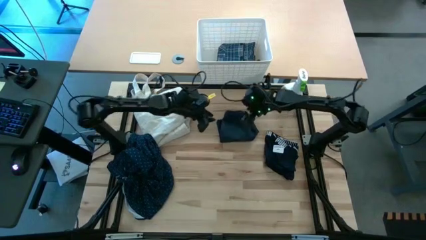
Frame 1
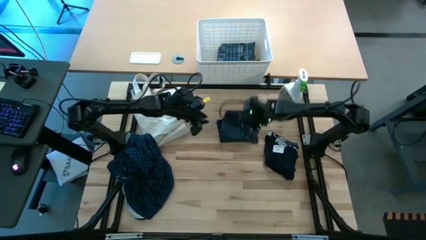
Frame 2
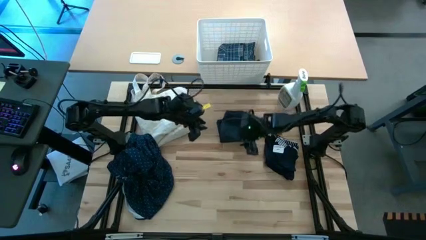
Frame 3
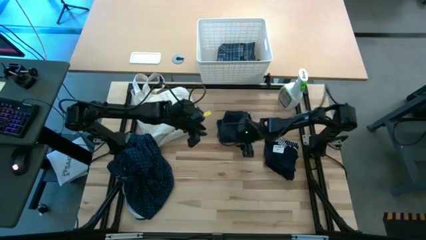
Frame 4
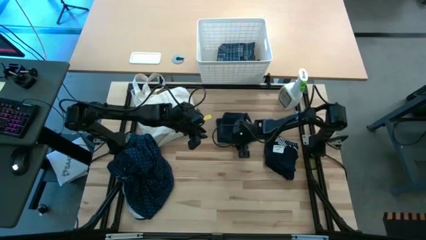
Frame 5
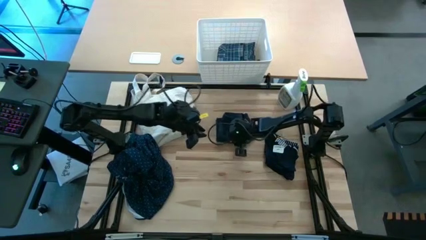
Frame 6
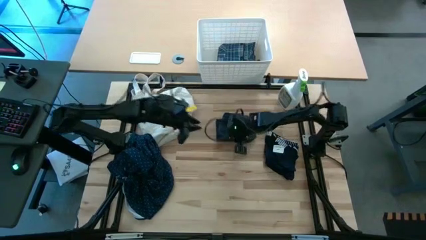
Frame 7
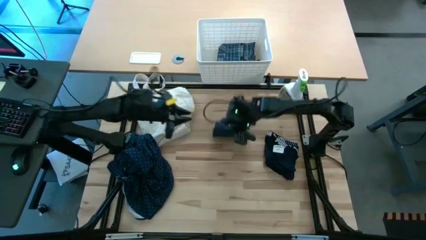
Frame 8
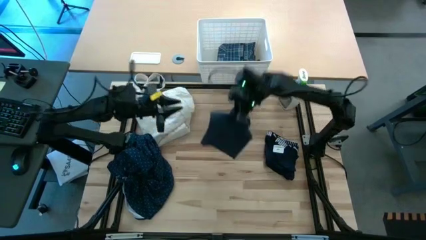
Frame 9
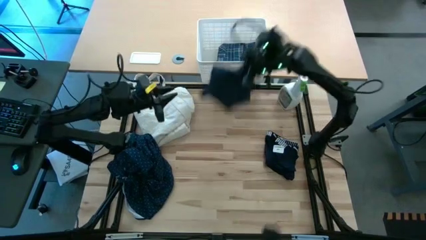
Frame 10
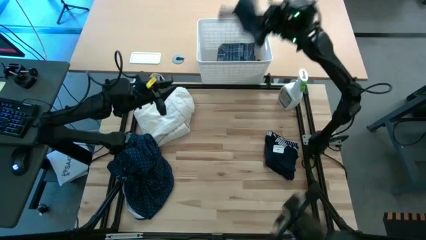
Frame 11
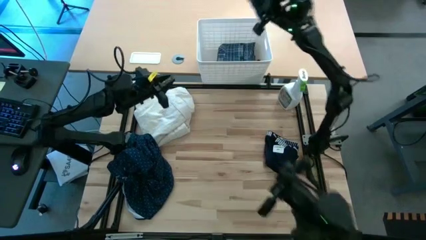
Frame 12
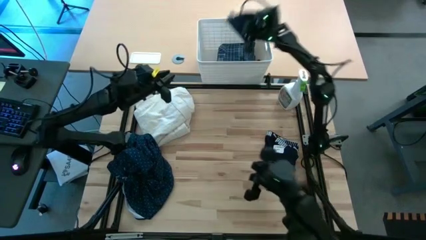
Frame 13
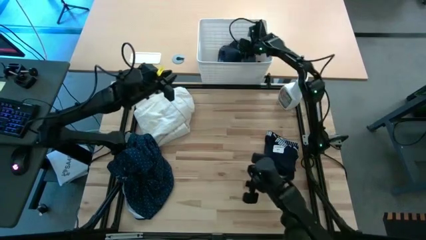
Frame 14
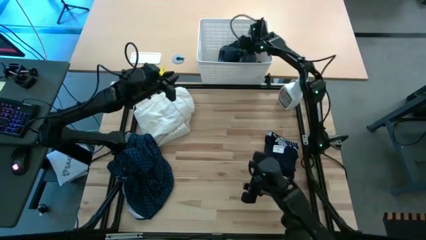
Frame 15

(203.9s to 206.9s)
Put the folded black short into the white bin

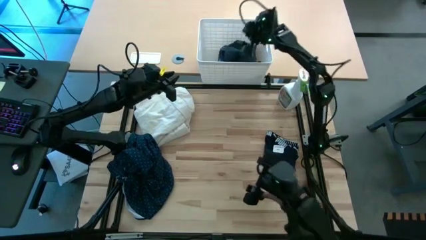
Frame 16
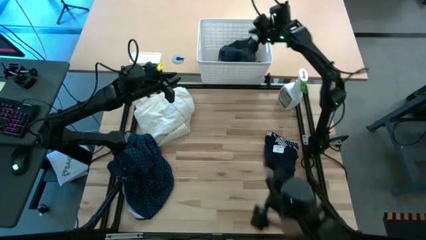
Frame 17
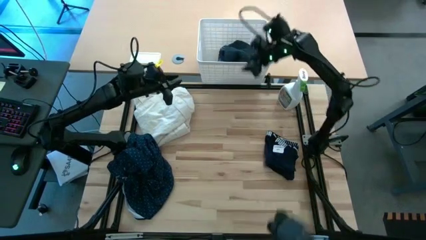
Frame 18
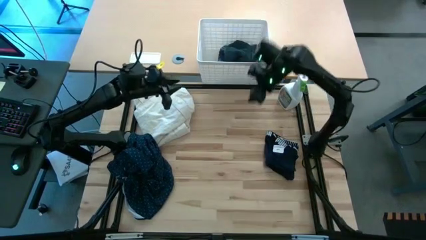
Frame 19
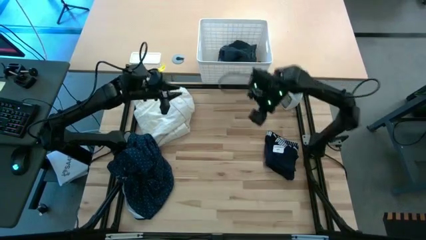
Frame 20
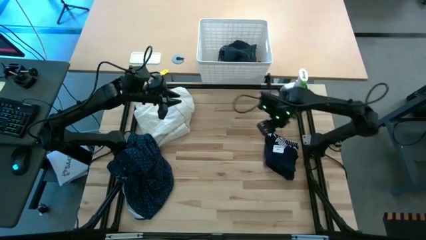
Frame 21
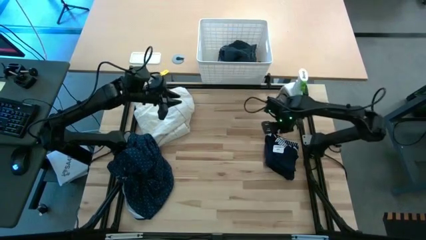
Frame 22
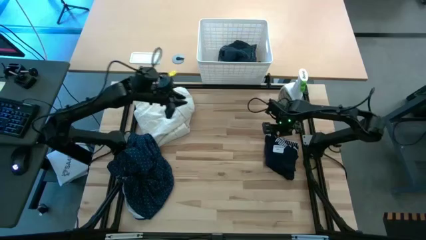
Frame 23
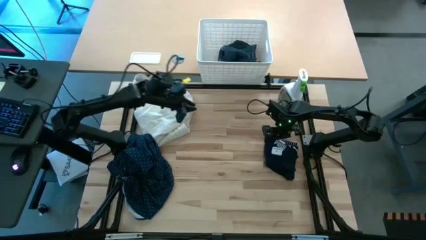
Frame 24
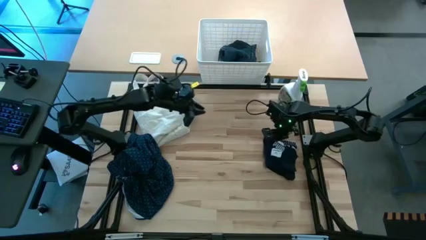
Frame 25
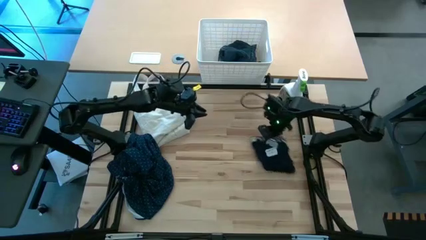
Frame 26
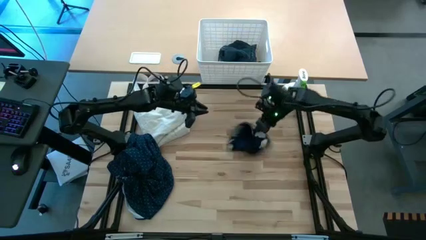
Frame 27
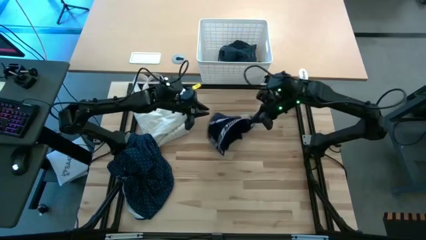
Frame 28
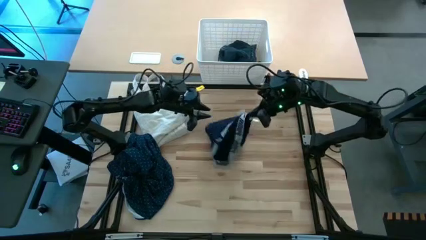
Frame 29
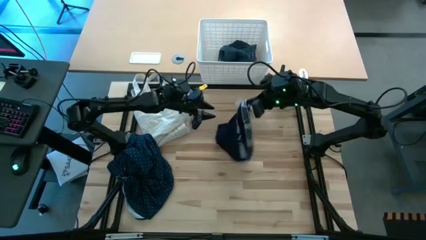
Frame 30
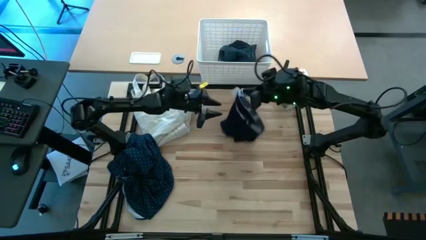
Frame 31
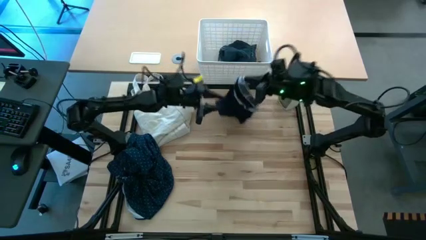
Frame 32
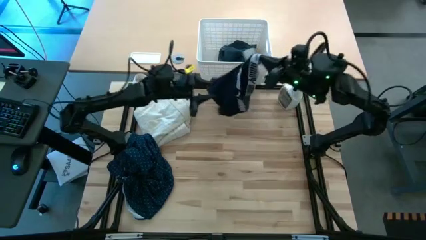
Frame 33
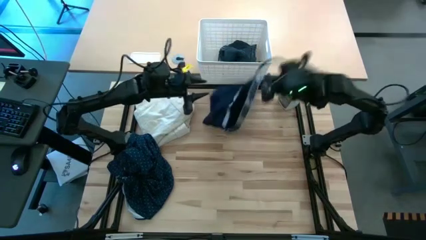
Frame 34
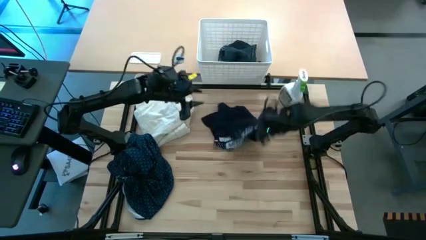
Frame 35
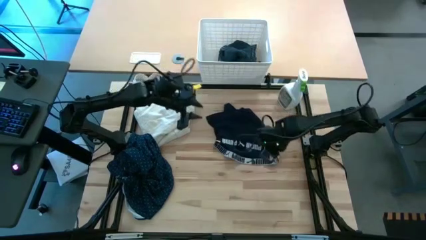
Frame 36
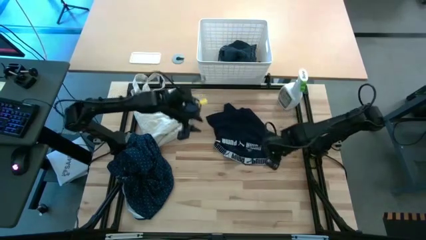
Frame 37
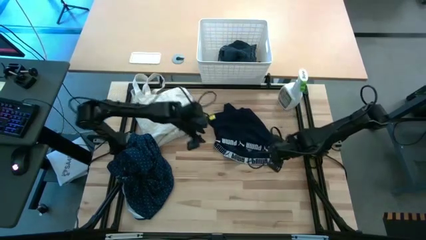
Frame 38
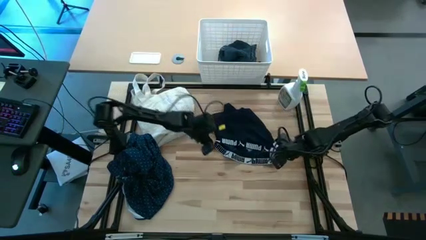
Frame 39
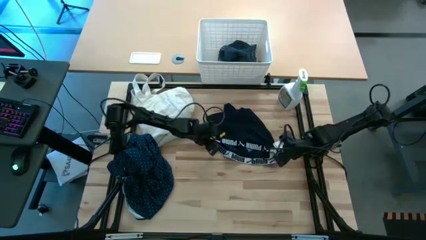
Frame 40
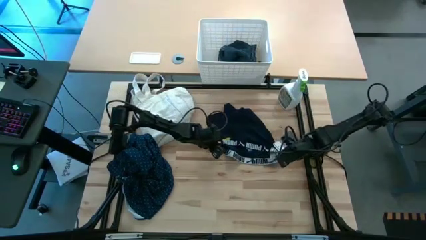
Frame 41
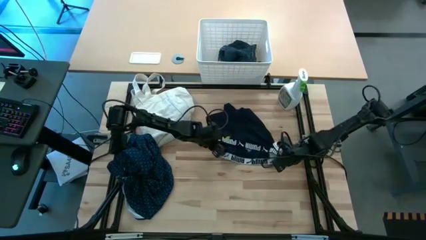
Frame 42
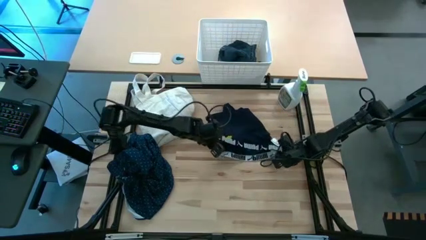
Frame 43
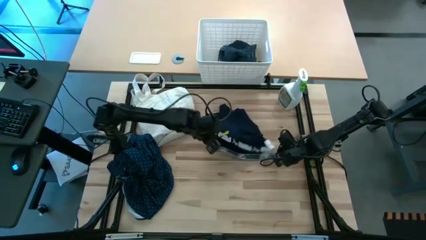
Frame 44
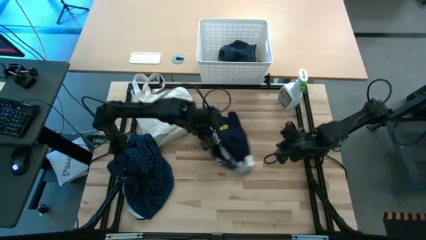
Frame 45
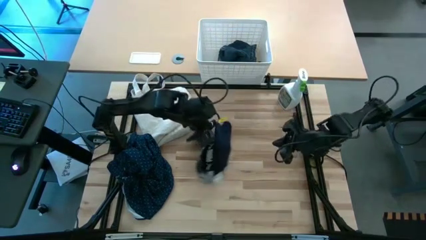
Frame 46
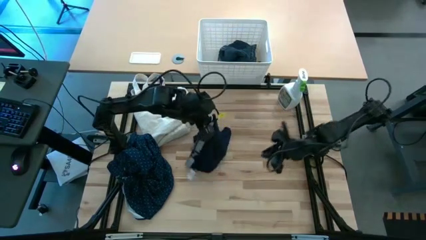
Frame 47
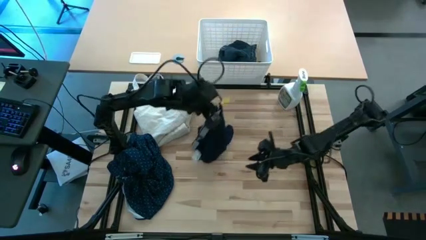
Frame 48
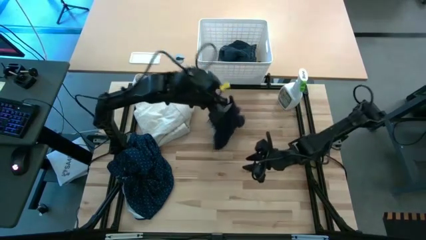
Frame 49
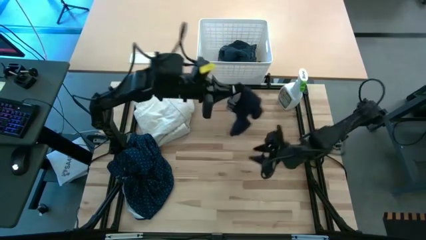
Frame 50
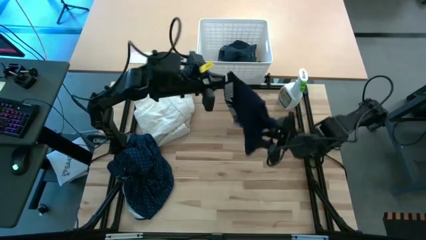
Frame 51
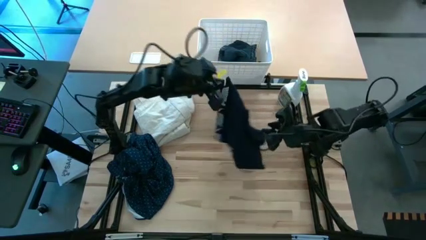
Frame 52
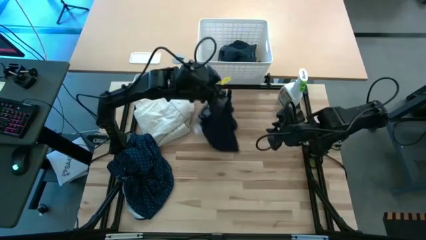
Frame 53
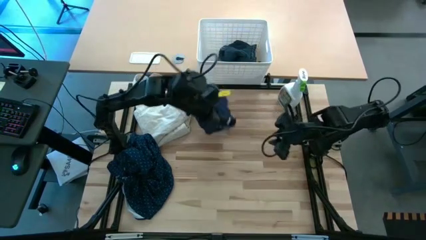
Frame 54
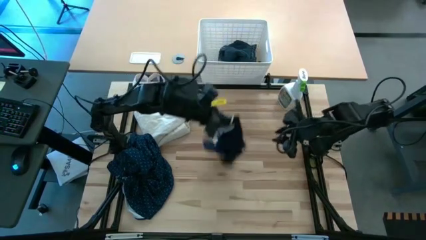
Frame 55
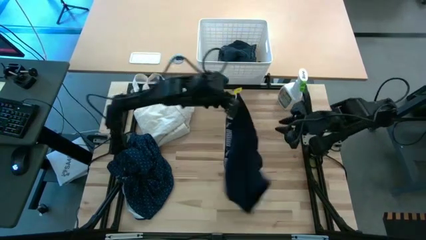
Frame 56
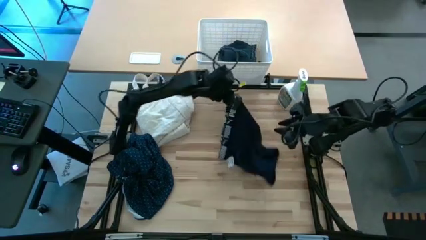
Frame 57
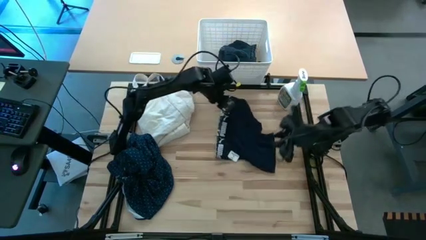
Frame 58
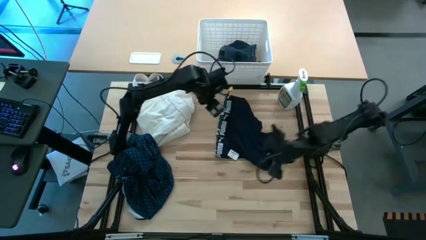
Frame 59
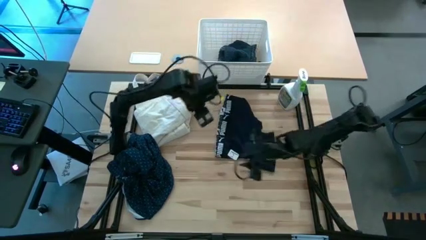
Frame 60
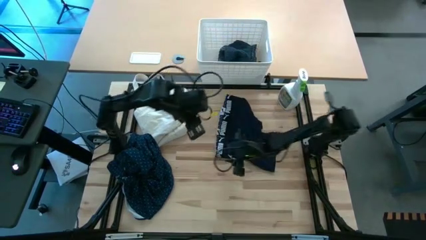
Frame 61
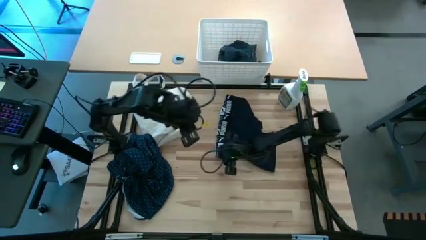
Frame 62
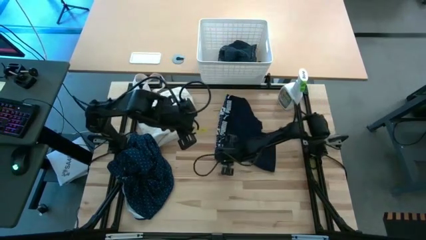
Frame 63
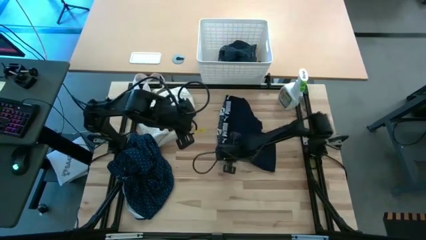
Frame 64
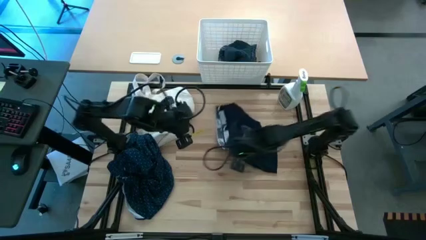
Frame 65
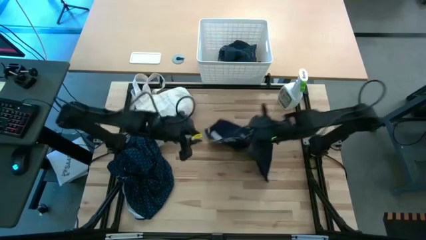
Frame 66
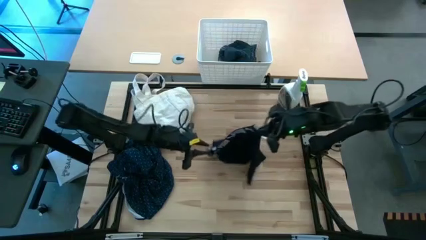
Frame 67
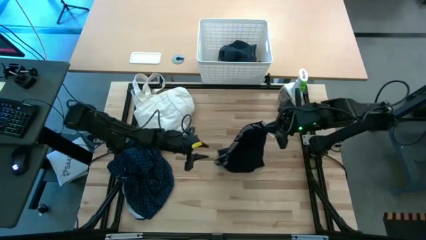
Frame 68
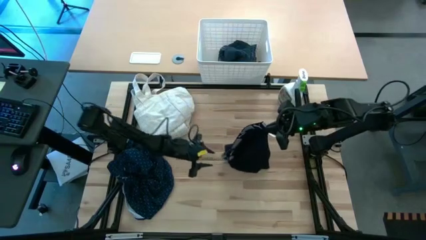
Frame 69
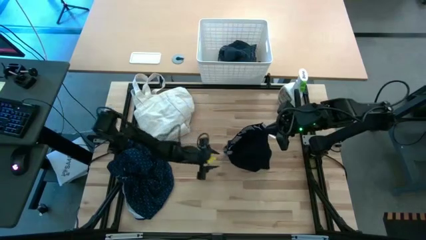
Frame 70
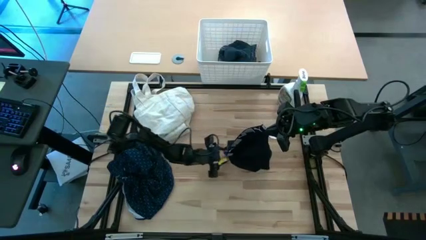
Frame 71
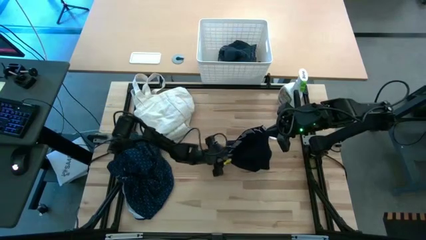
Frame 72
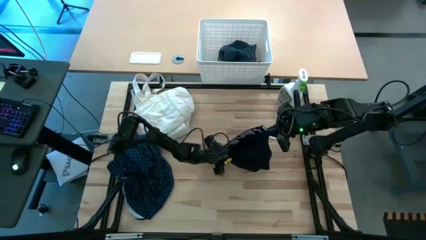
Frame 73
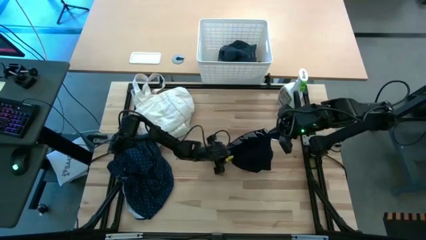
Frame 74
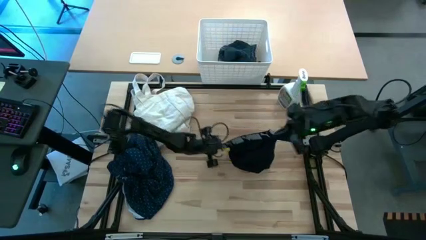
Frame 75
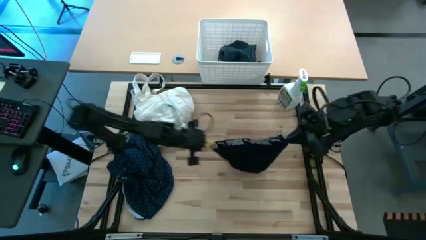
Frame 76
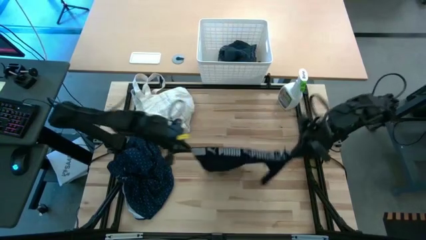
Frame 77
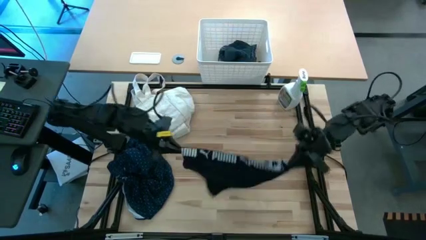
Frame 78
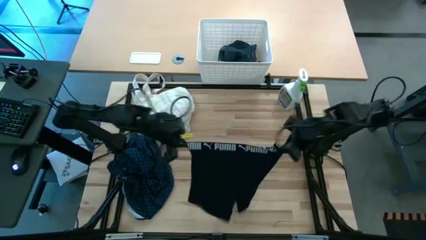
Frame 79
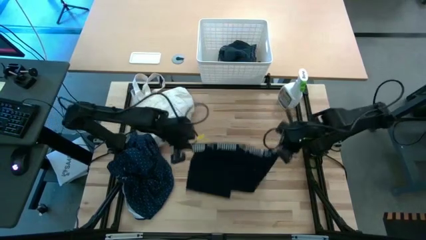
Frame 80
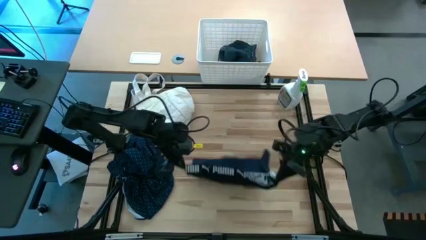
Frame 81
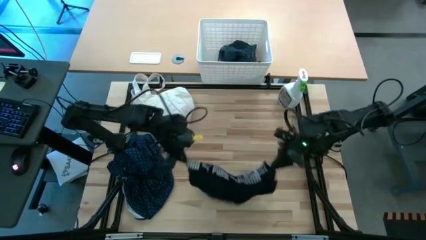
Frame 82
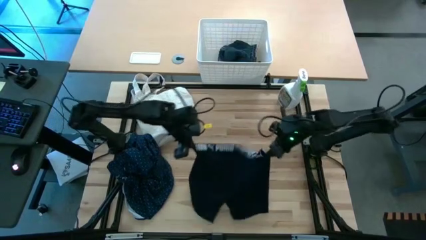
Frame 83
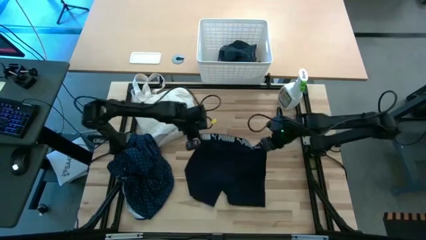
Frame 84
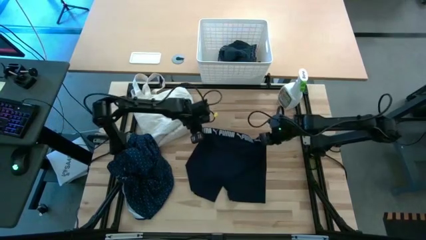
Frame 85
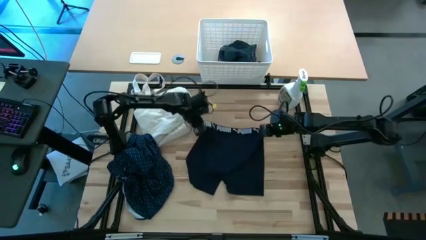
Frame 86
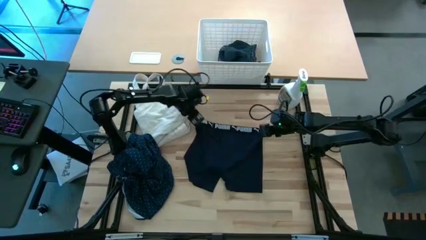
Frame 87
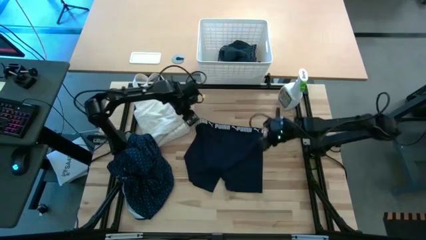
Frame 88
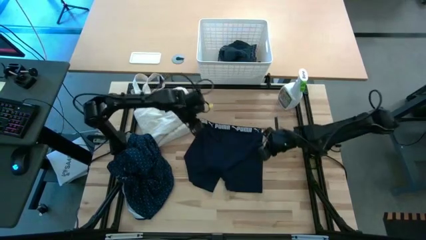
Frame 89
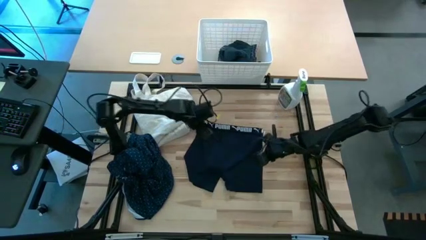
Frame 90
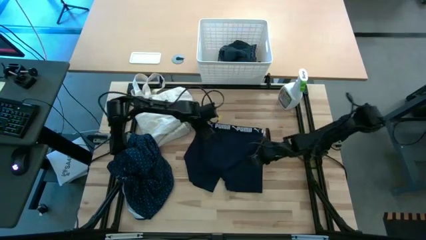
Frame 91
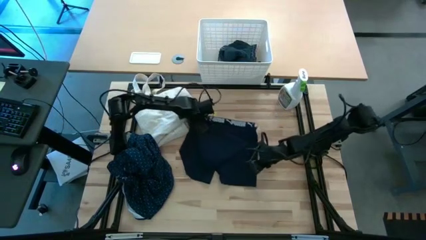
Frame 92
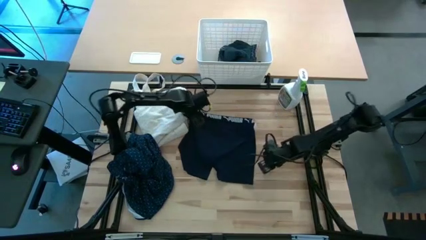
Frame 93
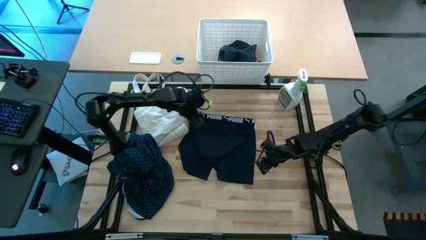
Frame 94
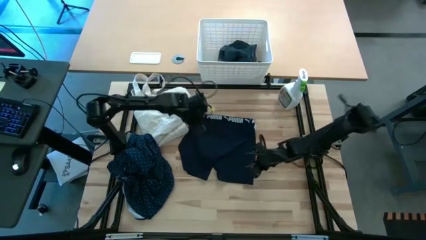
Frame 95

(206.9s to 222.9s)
Fold the black boxer short
